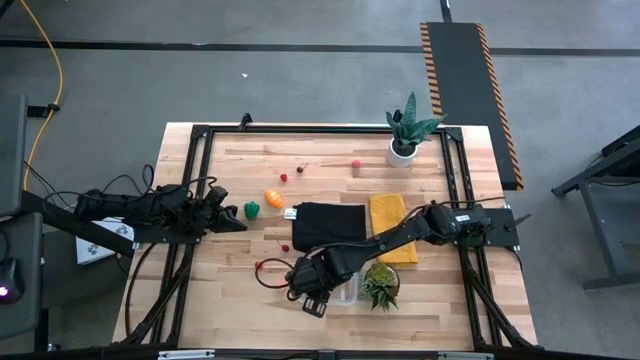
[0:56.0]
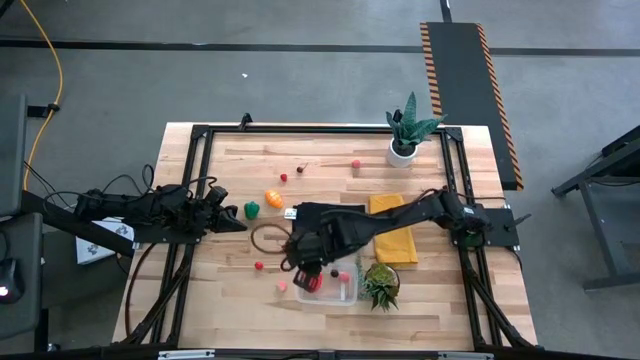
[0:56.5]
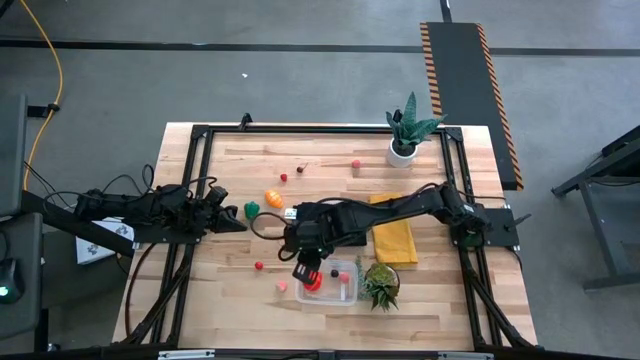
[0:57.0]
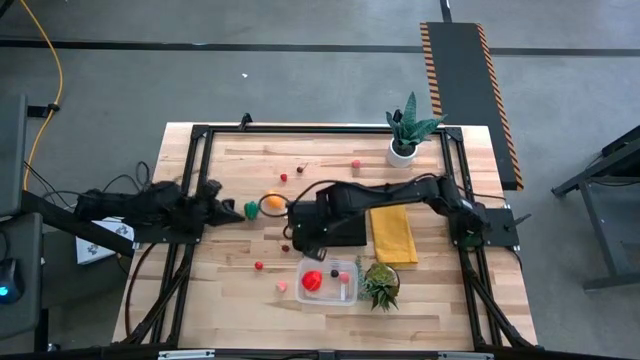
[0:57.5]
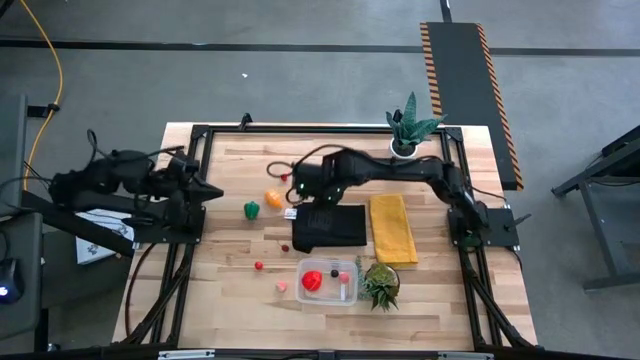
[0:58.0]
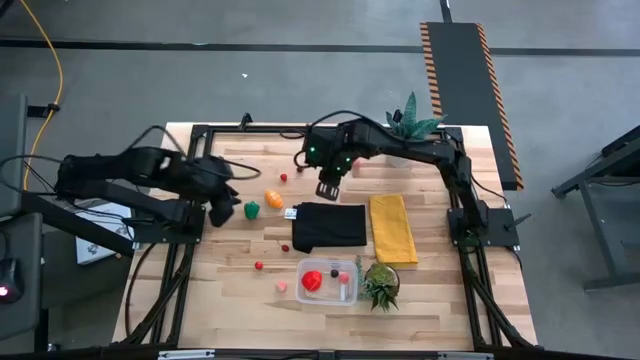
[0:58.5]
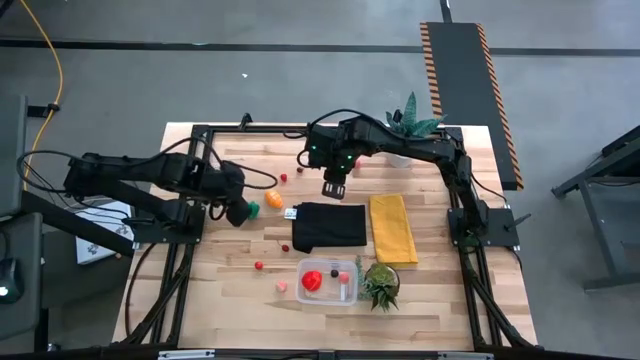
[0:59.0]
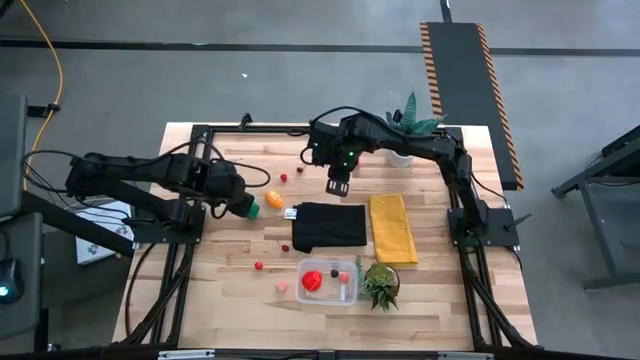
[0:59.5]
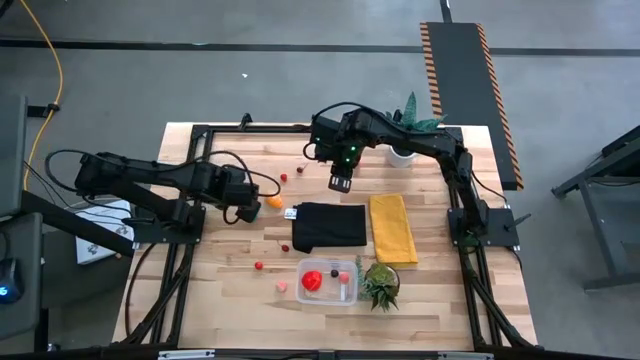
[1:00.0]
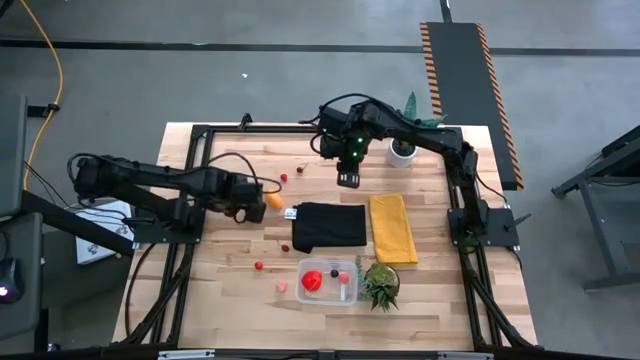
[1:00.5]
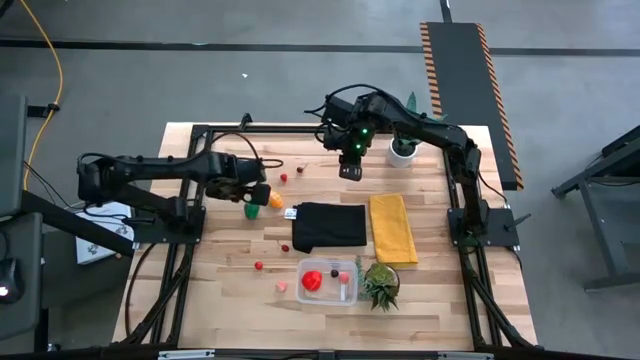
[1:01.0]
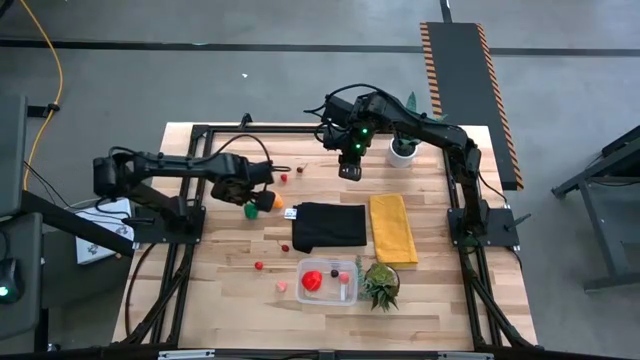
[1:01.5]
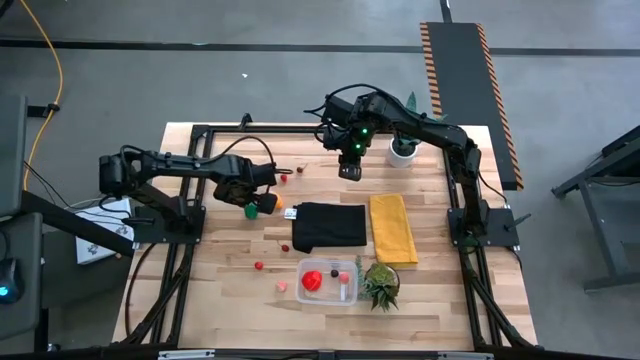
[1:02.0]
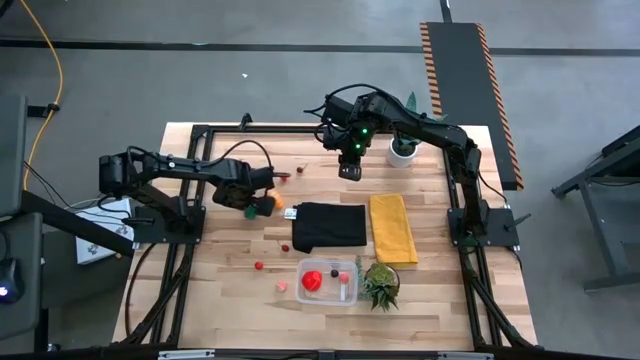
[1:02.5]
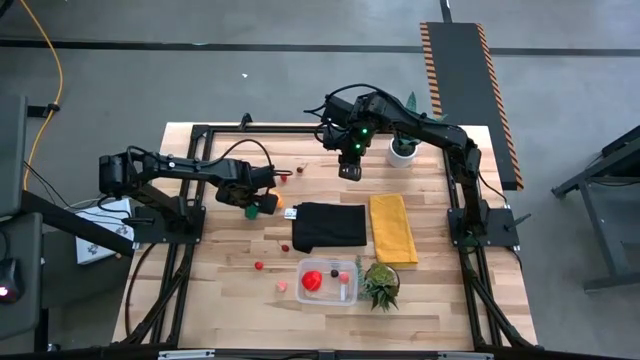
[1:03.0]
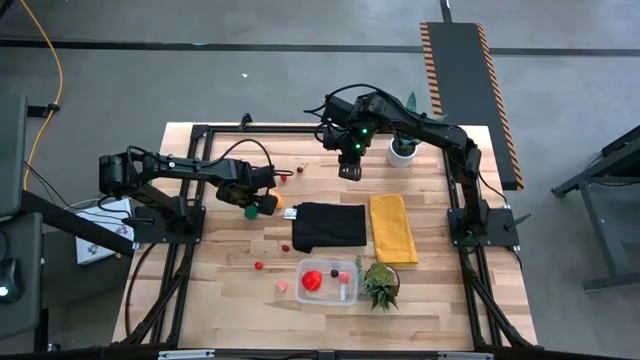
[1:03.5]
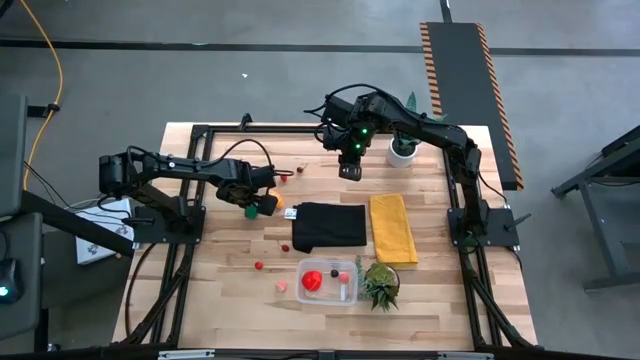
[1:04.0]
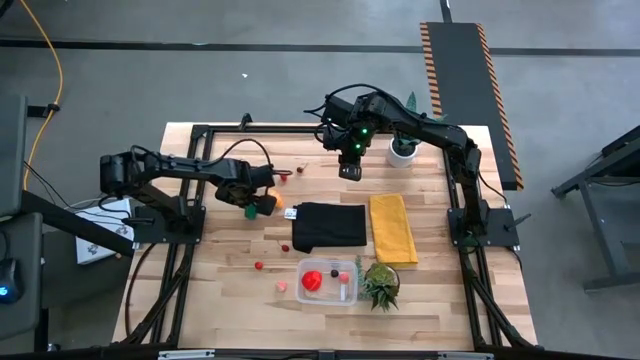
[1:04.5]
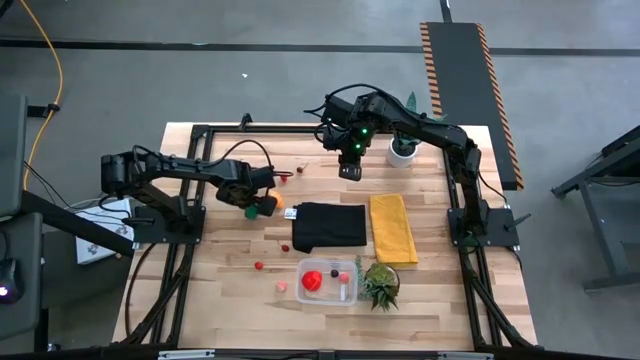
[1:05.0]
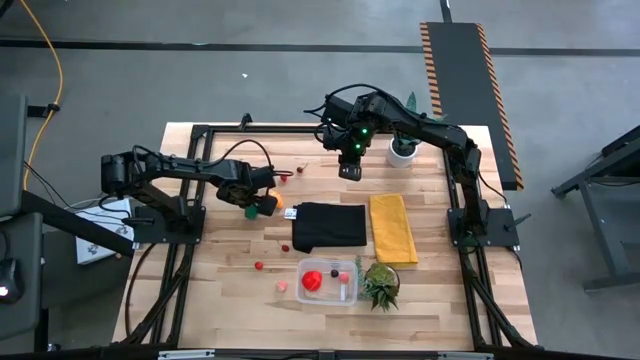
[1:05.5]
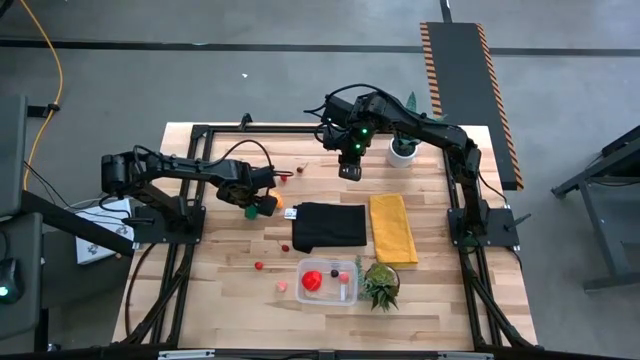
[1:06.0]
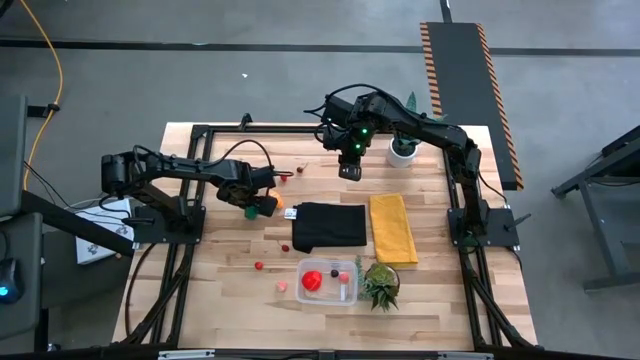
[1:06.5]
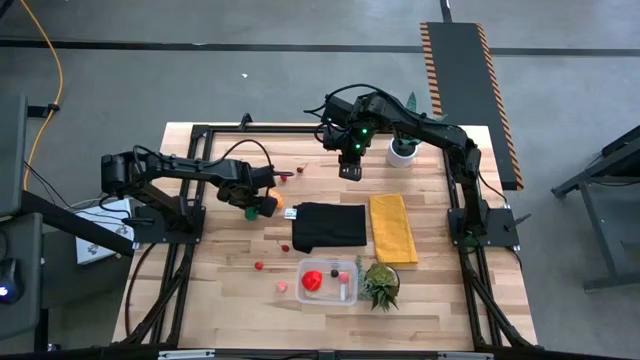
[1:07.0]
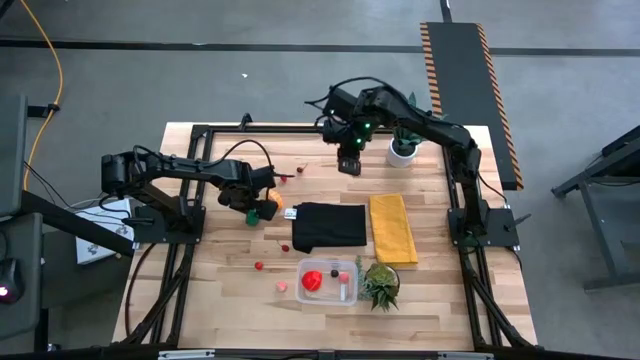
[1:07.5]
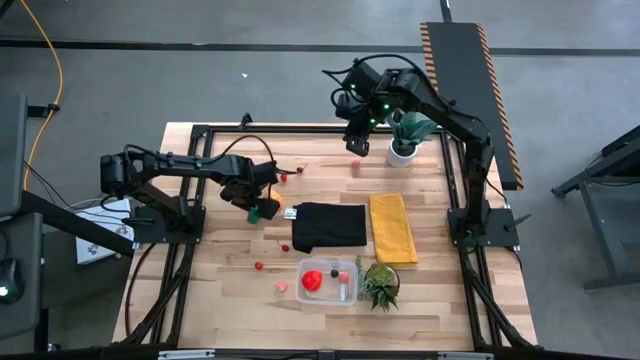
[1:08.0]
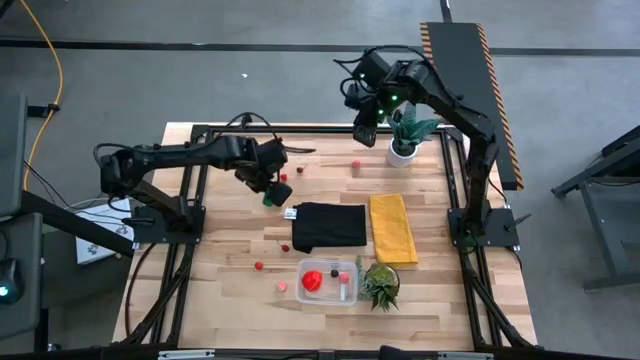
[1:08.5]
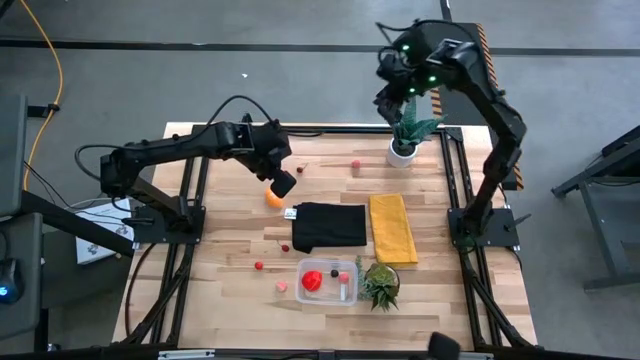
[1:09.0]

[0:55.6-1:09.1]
Task: Pick and placing Produce into tupperware
Put the bell pepper into the transparent bin

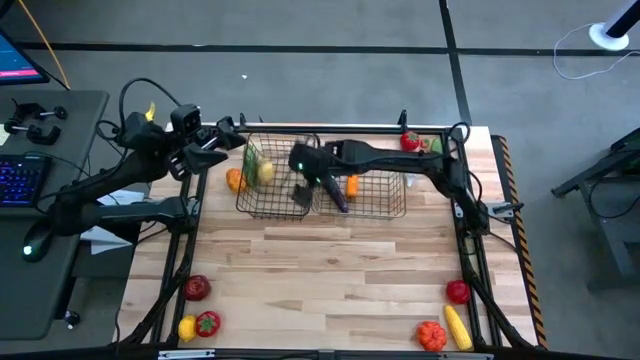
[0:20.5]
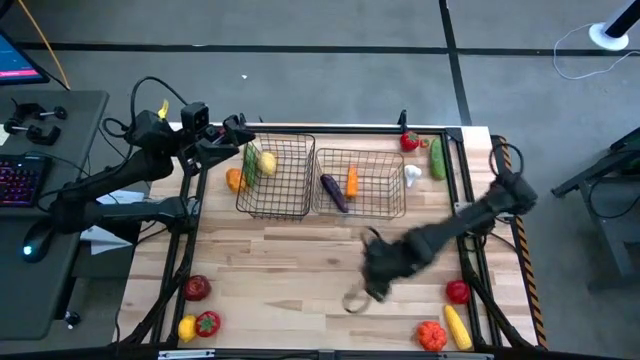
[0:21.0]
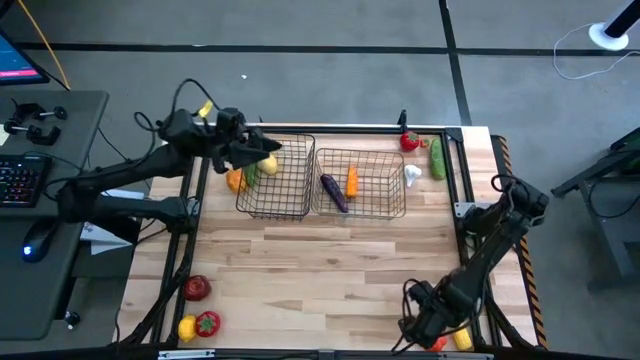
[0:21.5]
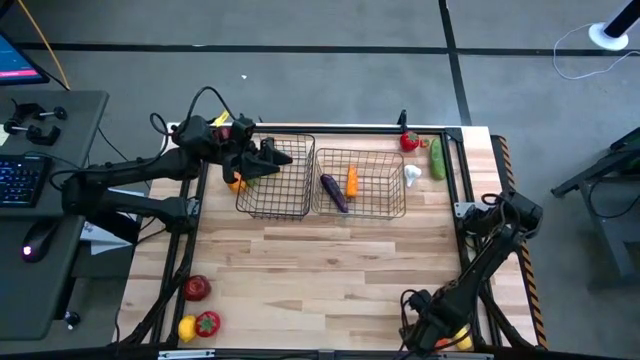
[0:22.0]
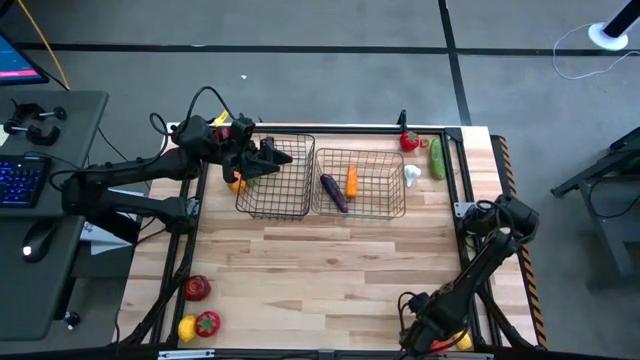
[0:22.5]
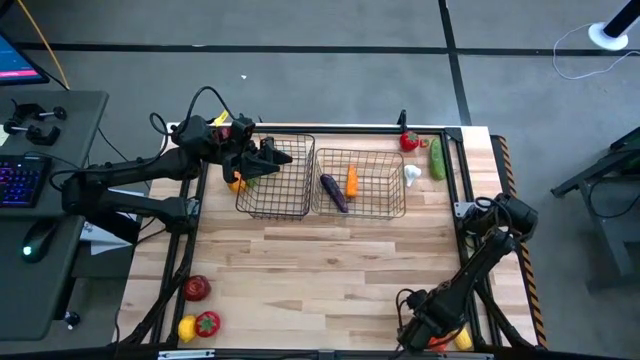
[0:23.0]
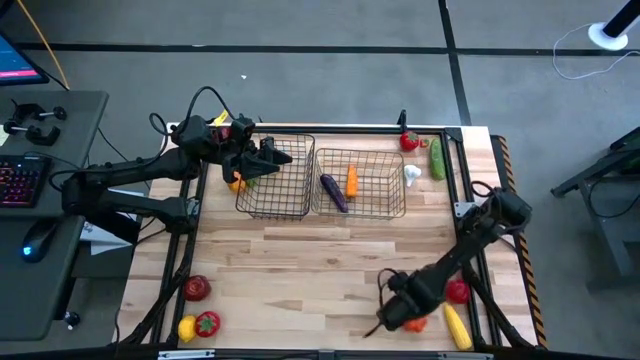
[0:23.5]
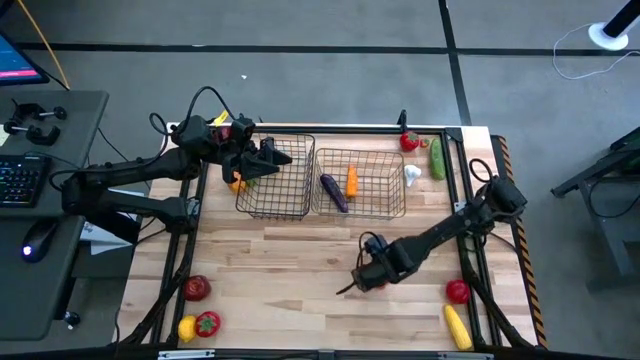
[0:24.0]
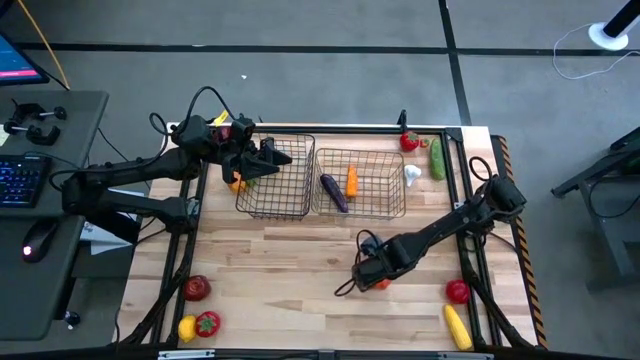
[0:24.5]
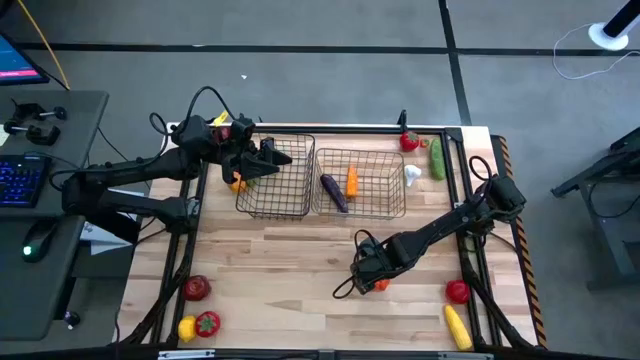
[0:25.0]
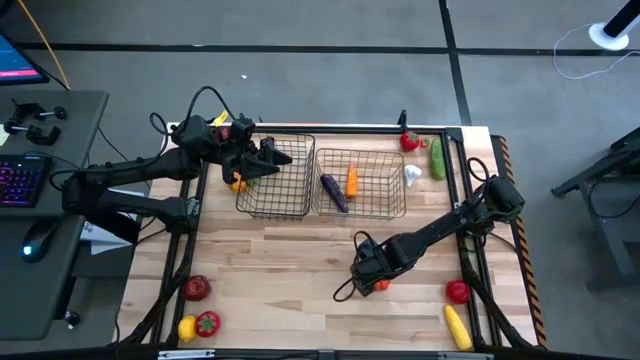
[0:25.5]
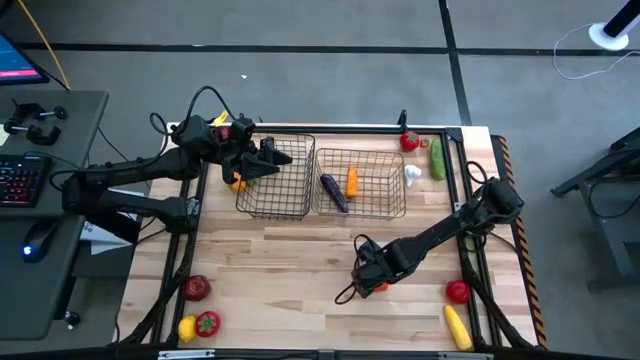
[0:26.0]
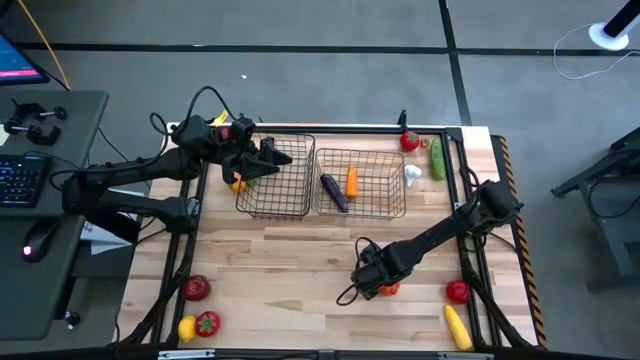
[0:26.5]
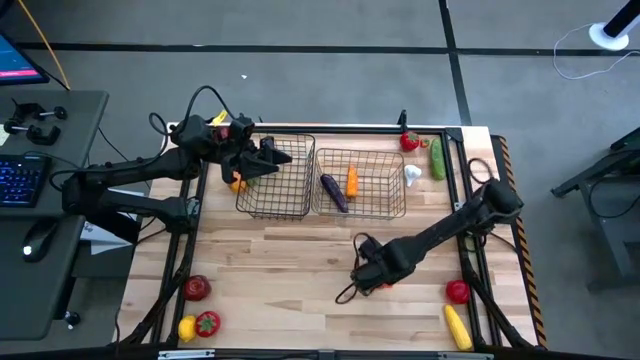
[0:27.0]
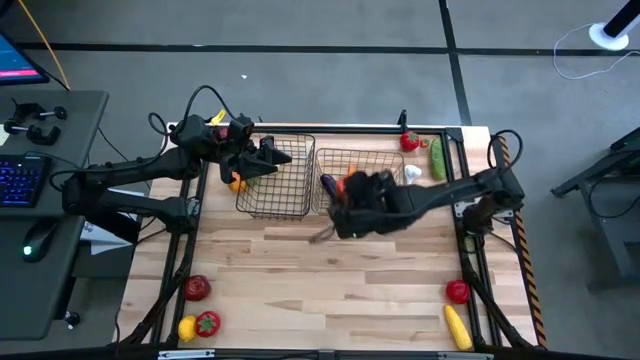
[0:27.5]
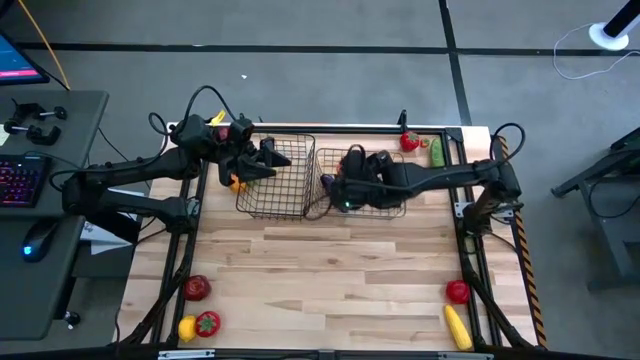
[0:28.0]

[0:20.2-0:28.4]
Task: Sort produce into baskets
Put the pumpkin into the right wire basket
